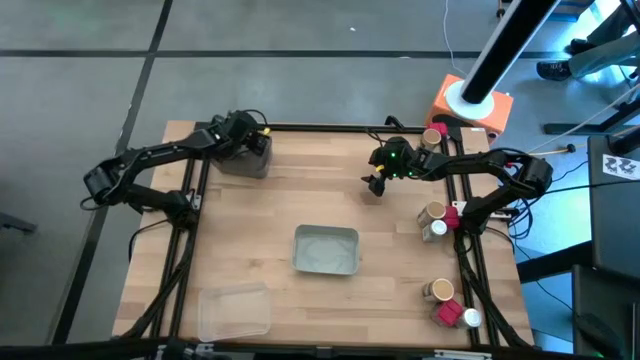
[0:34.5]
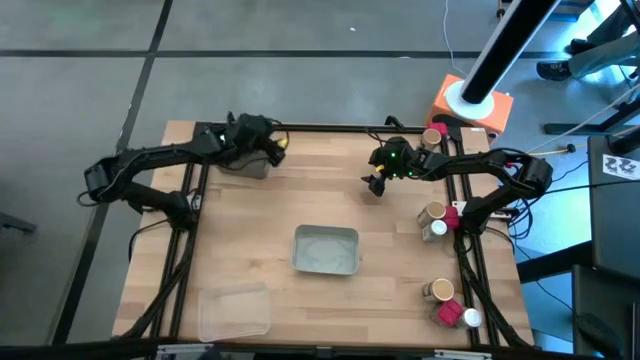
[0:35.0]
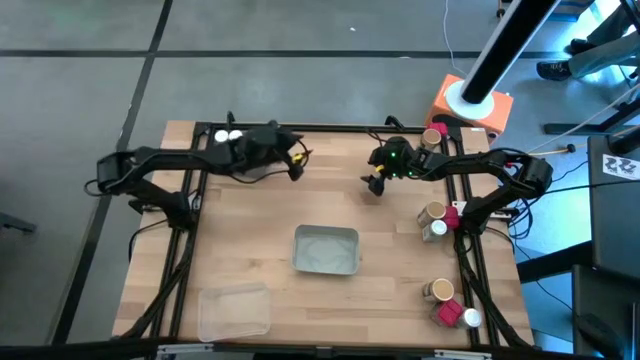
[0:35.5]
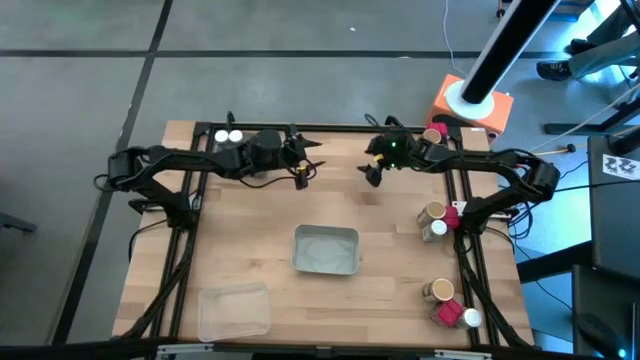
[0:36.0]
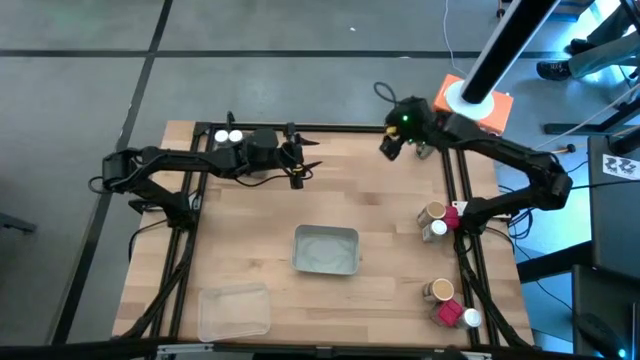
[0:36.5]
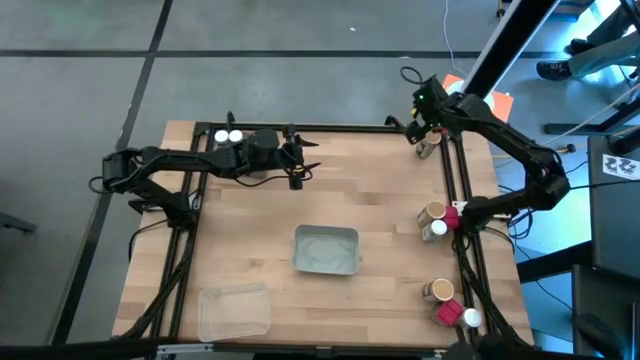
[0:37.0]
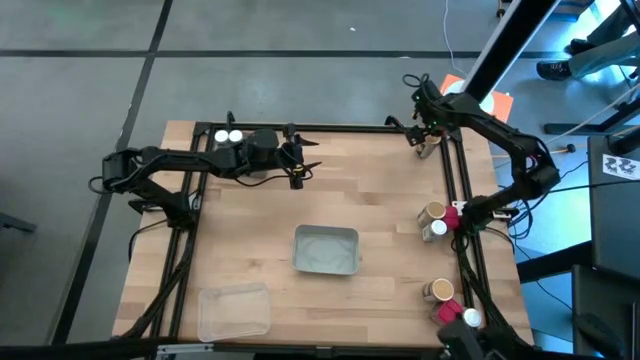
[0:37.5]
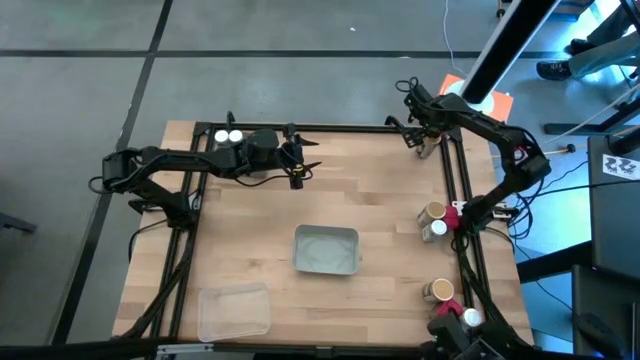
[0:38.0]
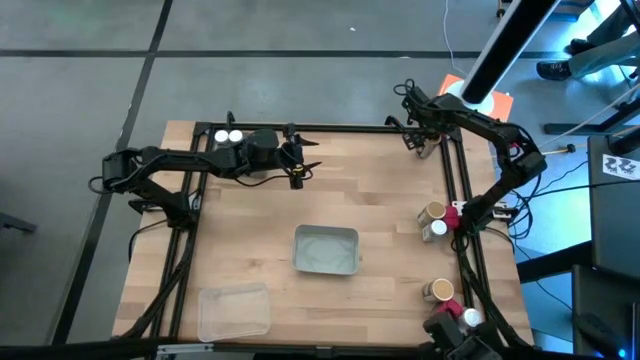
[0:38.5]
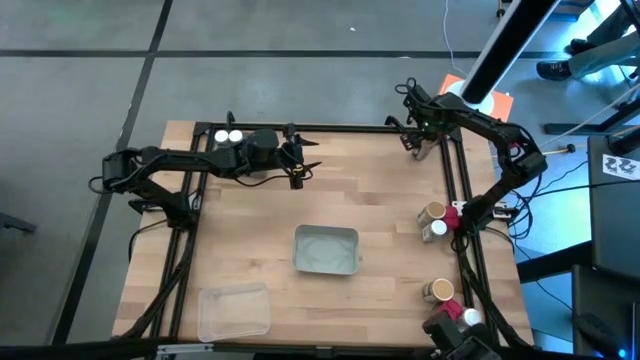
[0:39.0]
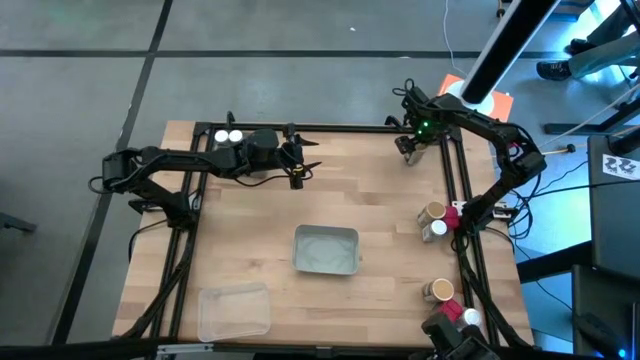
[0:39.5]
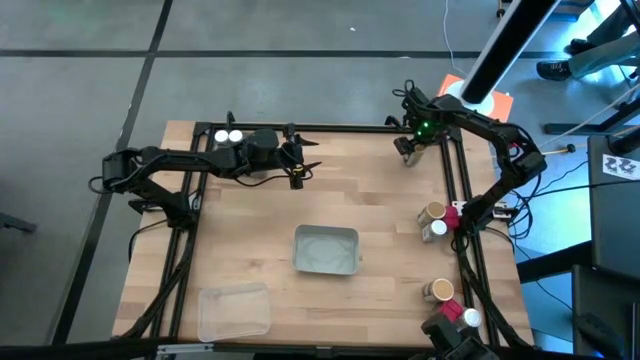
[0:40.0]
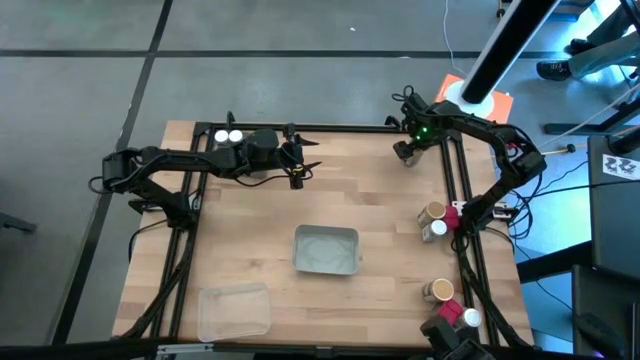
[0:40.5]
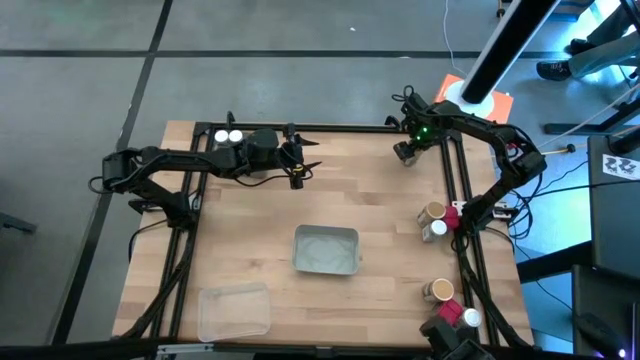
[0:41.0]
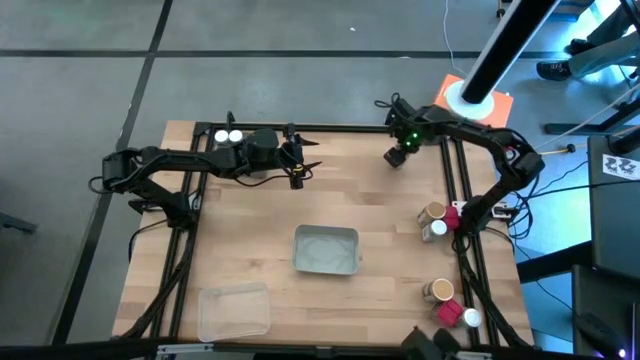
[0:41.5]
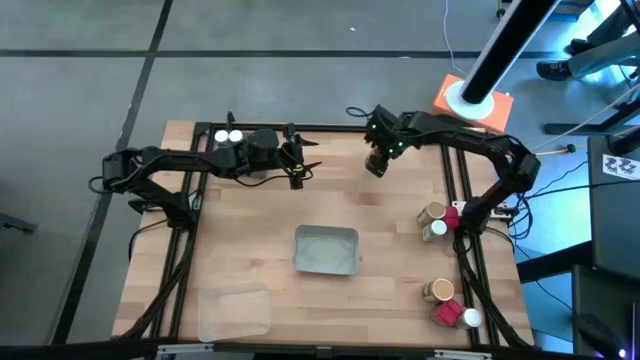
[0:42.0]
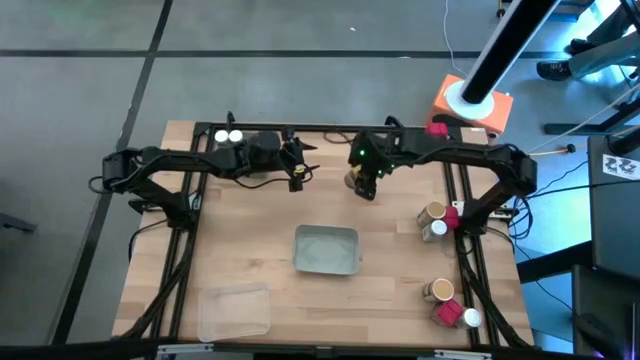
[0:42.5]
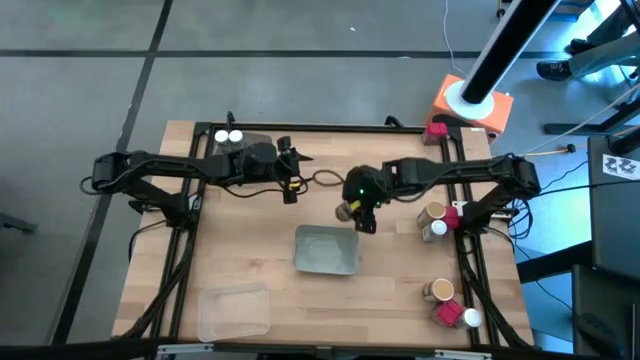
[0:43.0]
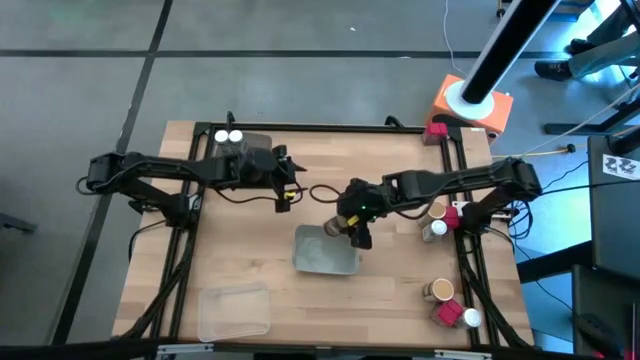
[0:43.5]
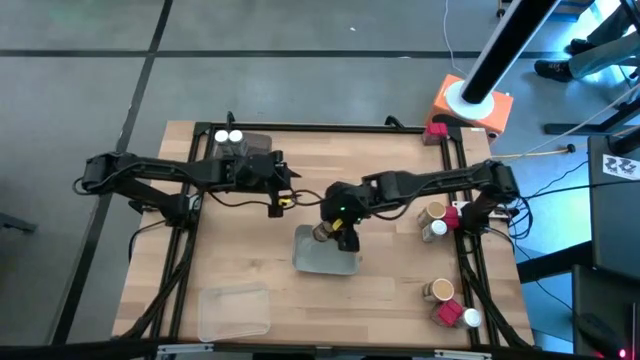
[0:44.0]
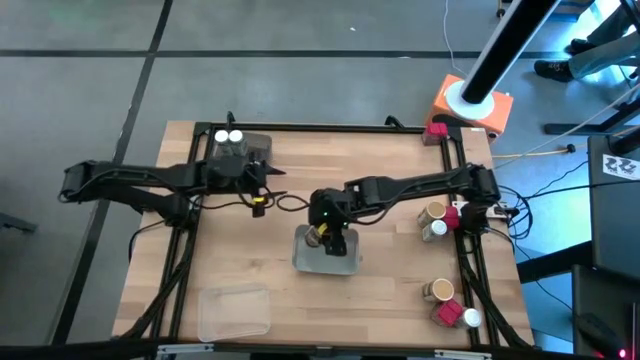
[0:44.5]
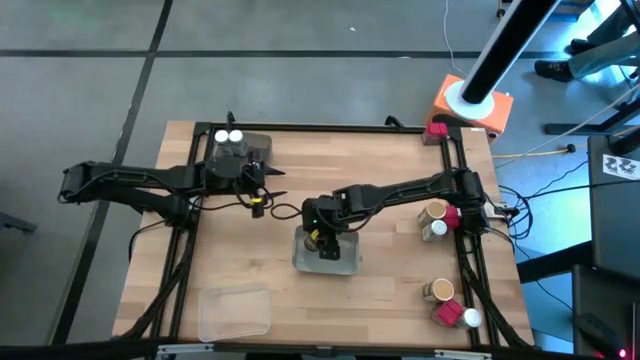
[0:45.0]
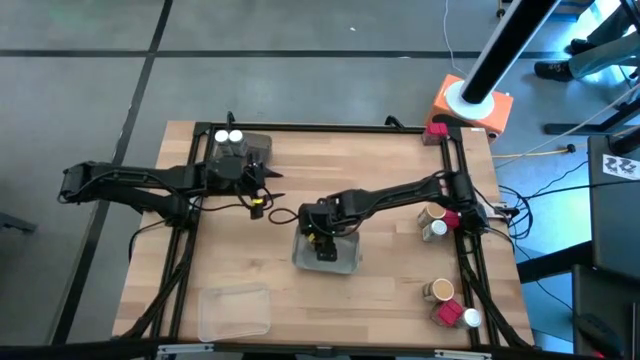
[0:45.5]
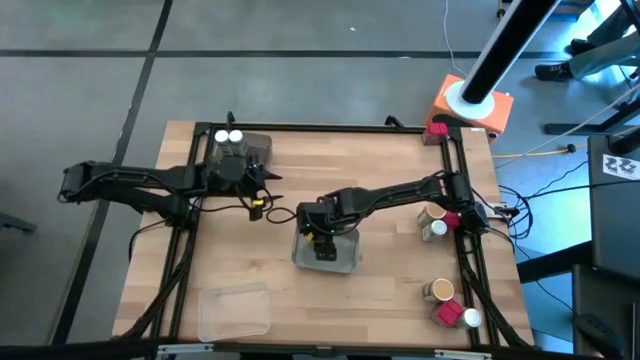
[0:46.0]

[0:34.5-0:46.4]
Task: Sort spices by type
Put the top gold seasoning bottle into the gray bin

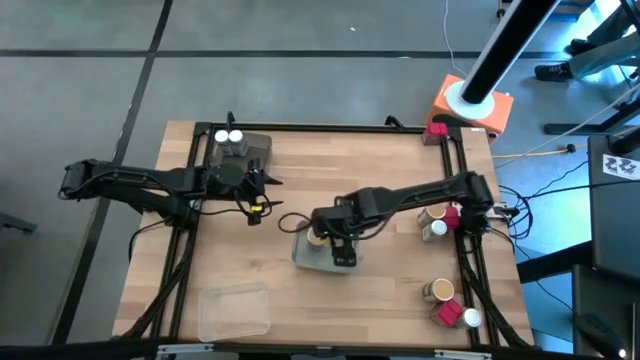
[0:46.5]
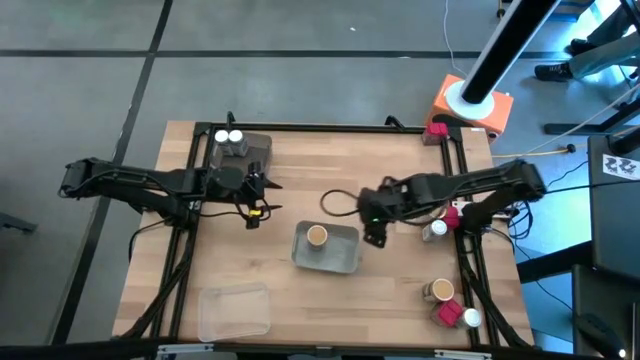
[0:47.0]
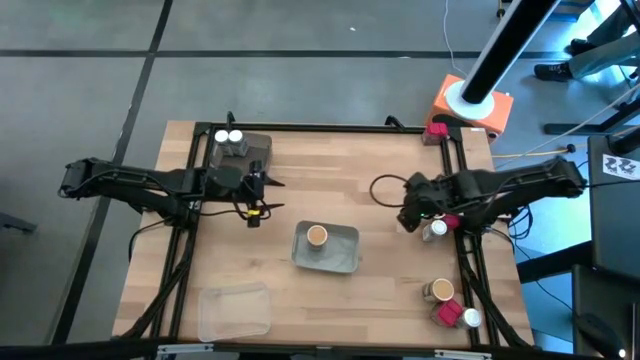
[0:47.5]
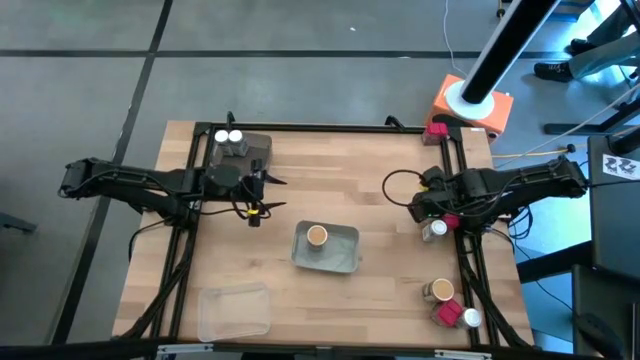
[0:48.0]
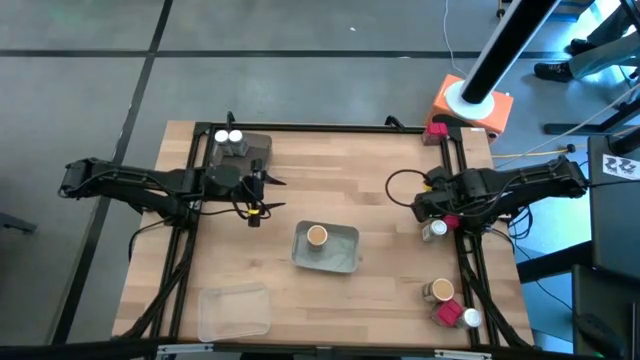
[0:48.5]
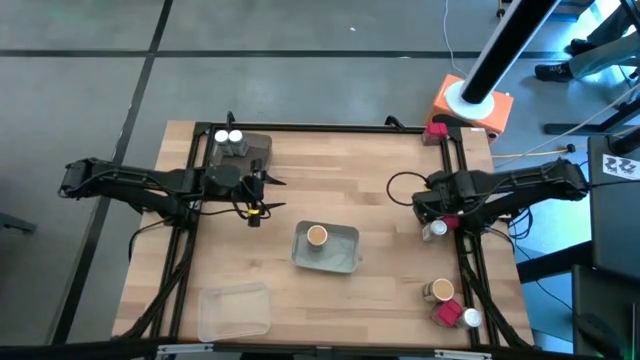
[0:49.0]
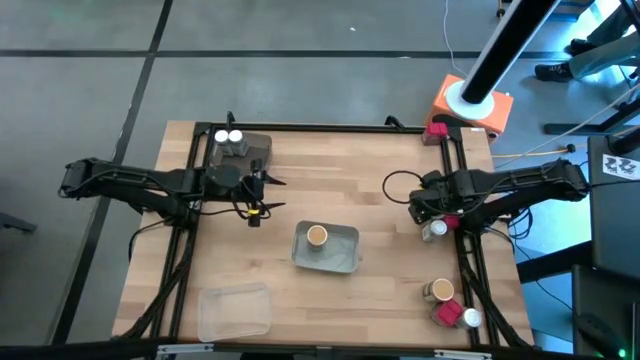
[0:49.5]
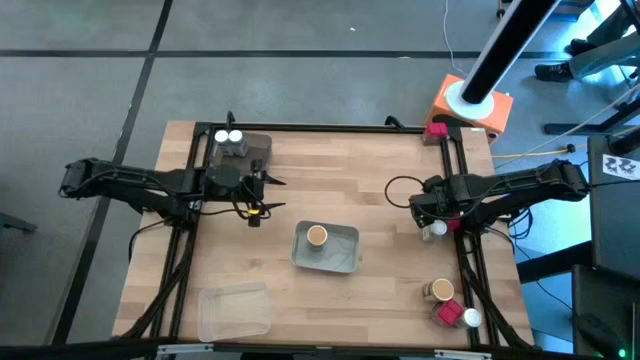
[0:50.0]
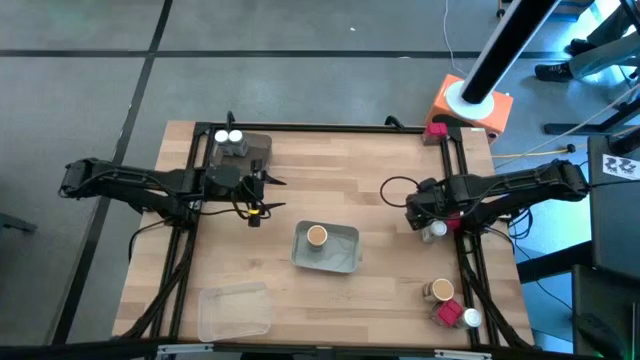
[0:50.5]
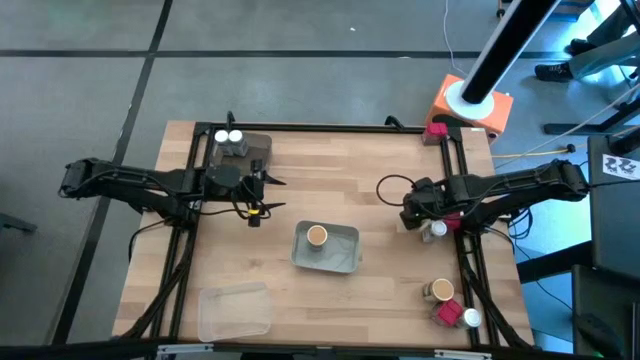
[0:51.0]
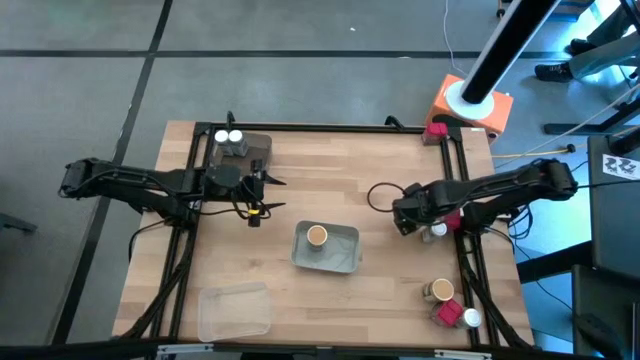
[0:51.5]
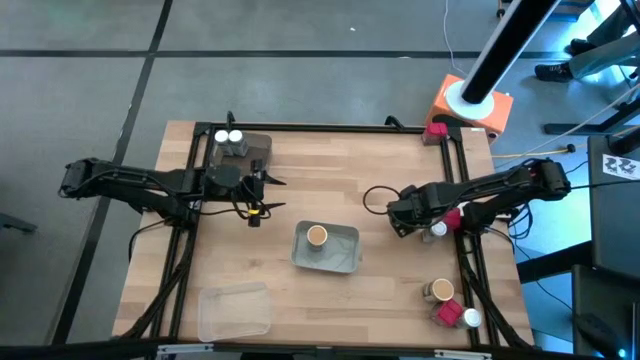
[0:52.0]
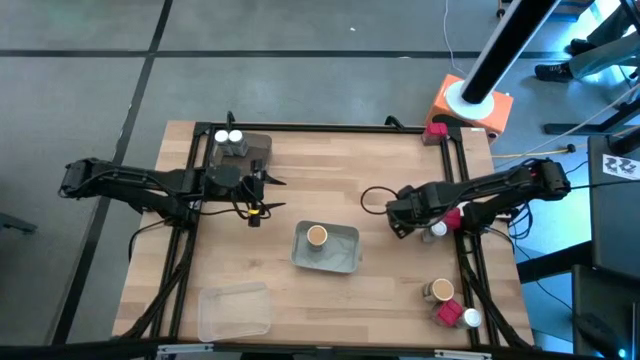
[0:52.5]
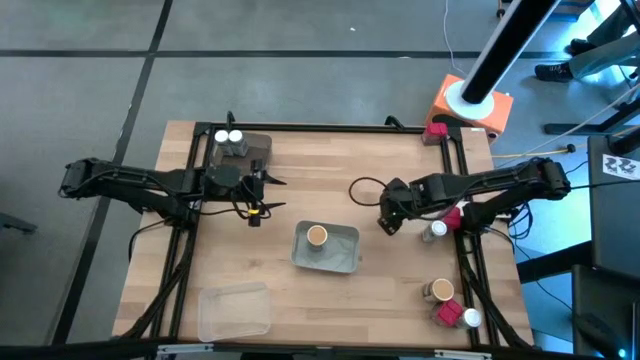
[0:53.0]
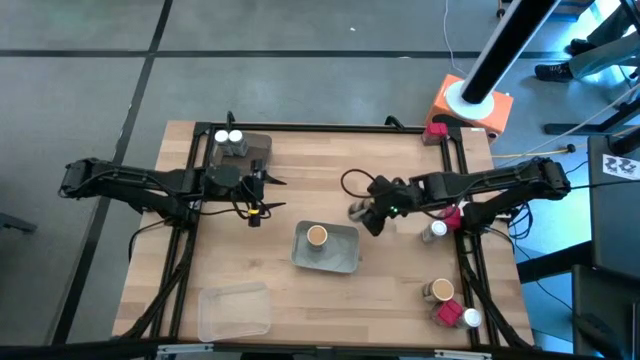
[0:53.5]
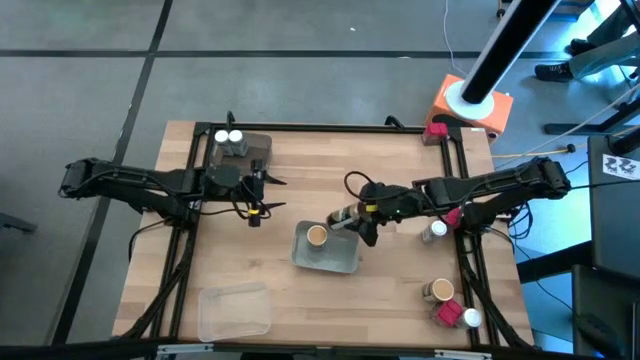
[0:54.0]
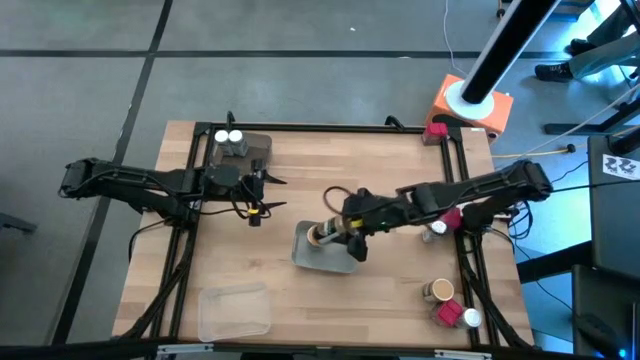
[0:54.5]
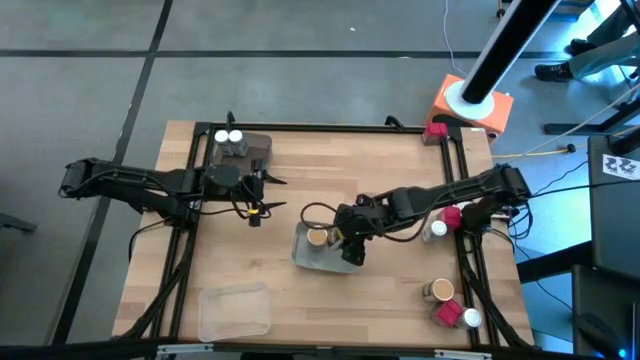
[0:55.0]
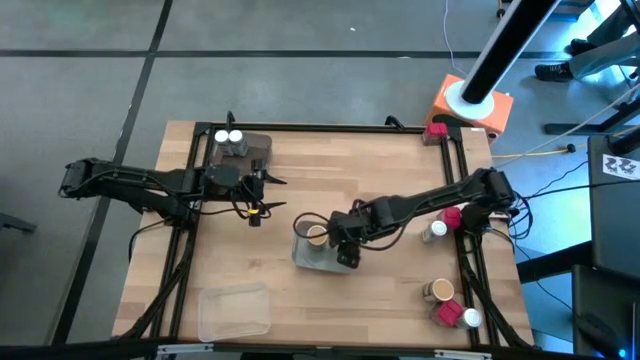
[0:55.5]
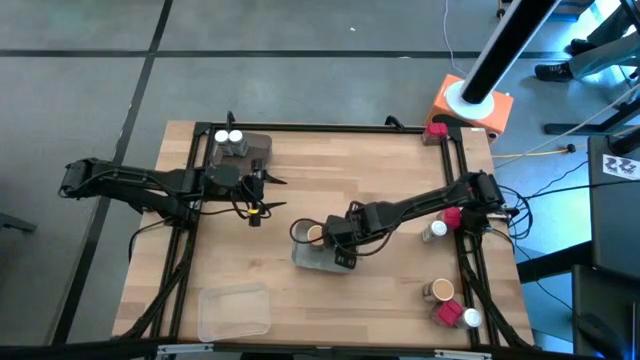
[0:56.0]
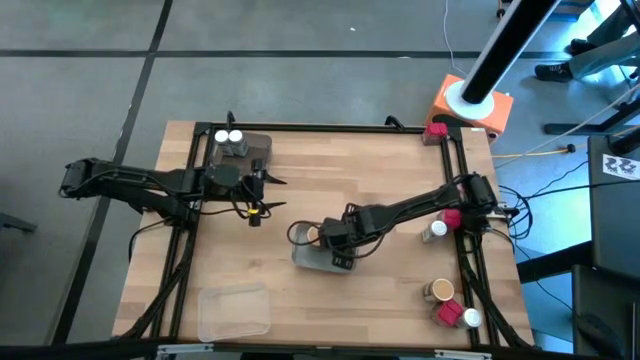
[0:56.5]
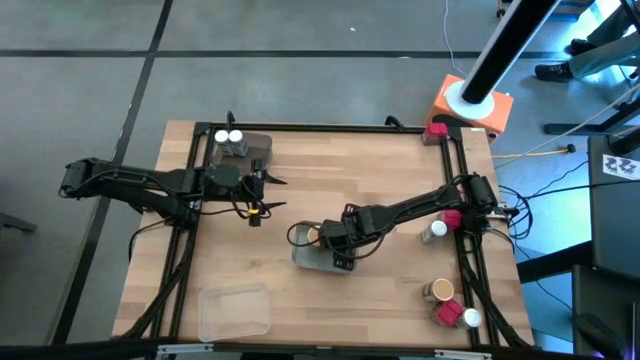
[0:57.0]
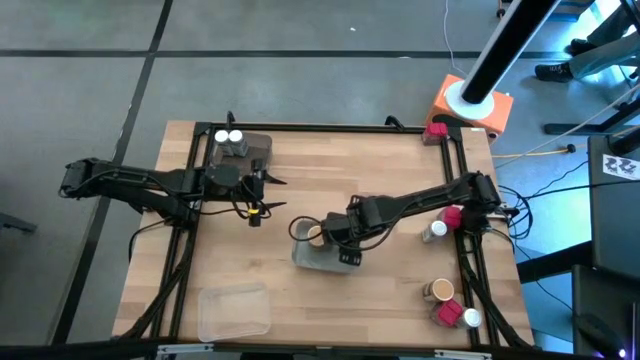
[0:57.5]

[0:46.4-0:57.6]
Put the top gold seasoning bottle into the gray bin
